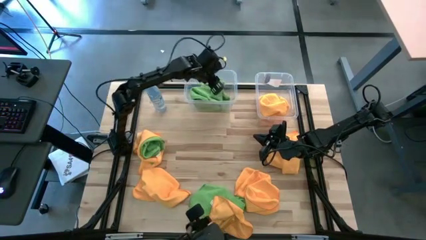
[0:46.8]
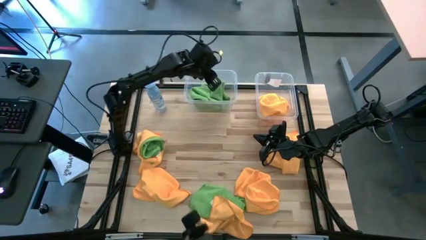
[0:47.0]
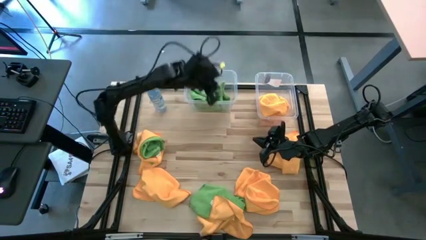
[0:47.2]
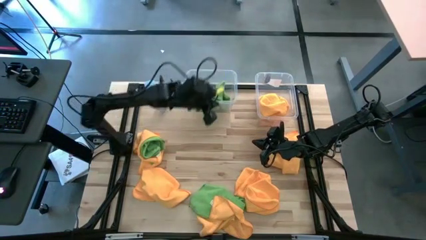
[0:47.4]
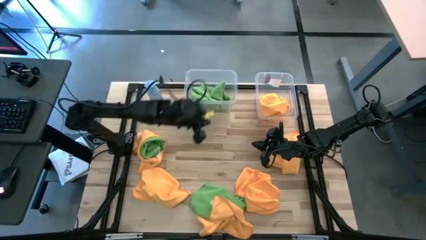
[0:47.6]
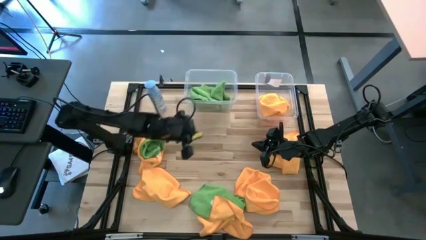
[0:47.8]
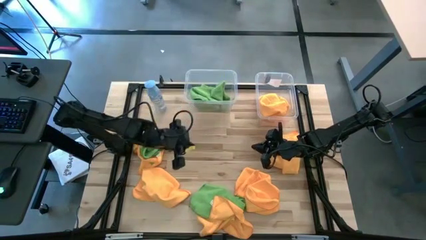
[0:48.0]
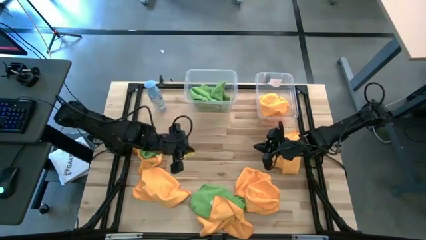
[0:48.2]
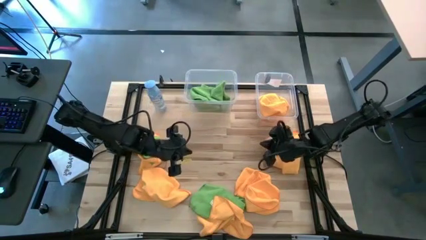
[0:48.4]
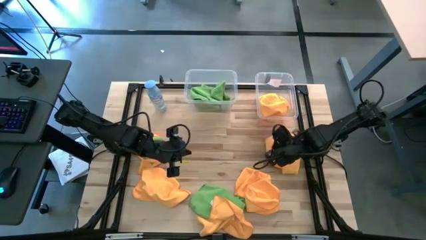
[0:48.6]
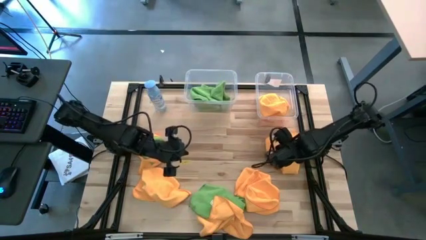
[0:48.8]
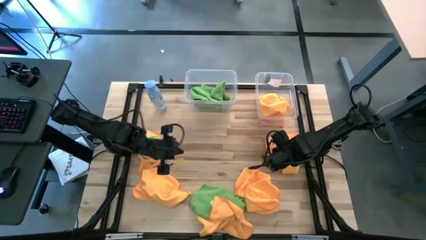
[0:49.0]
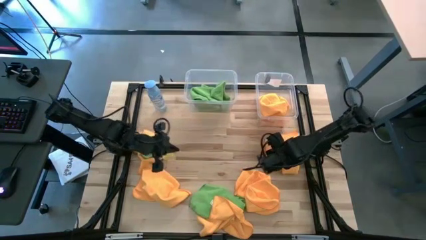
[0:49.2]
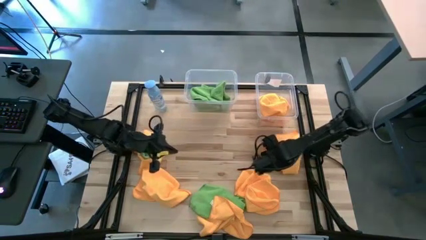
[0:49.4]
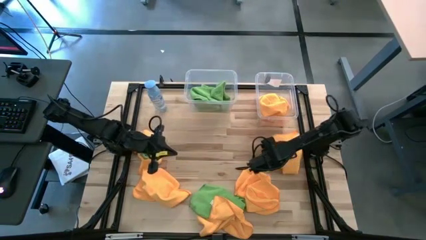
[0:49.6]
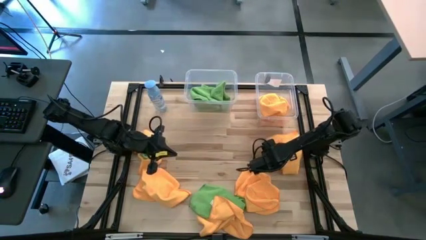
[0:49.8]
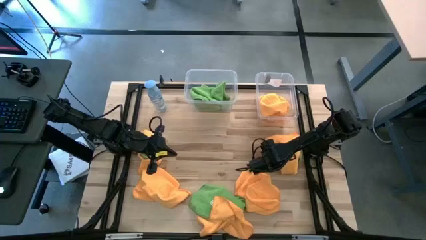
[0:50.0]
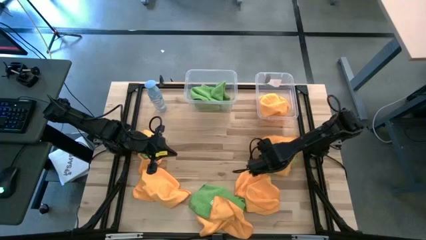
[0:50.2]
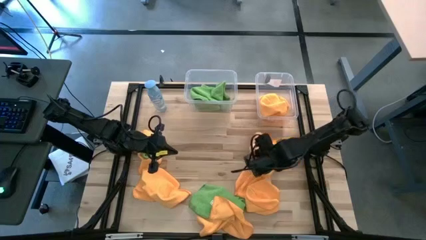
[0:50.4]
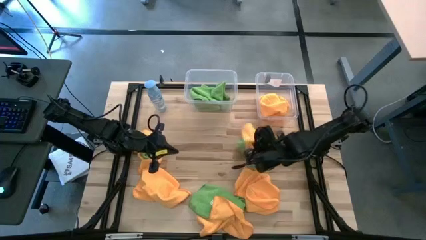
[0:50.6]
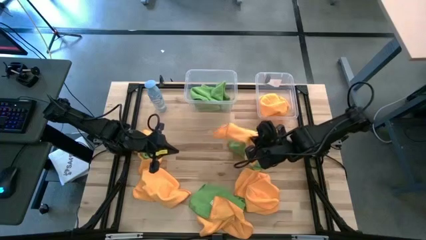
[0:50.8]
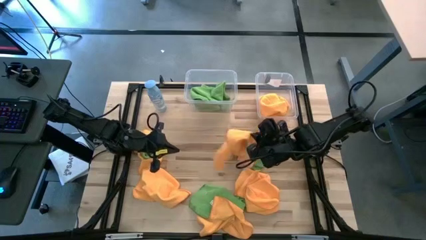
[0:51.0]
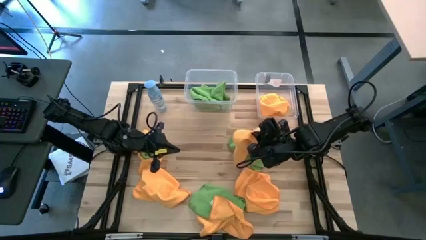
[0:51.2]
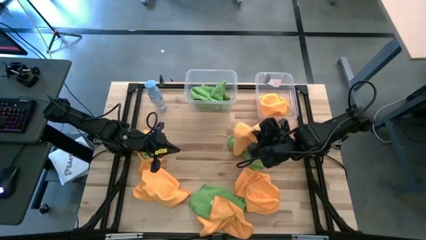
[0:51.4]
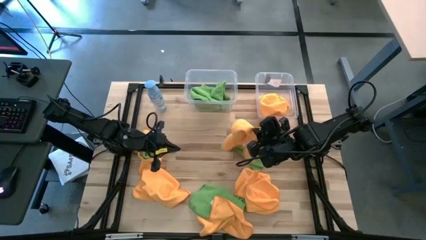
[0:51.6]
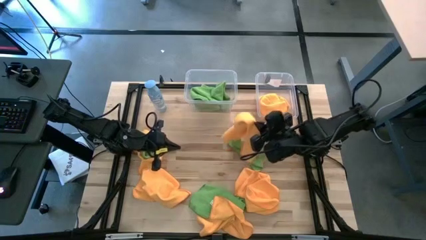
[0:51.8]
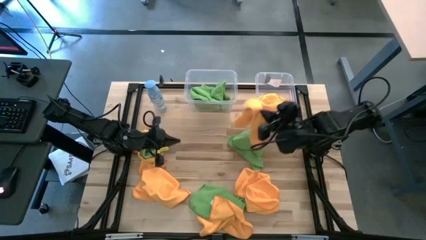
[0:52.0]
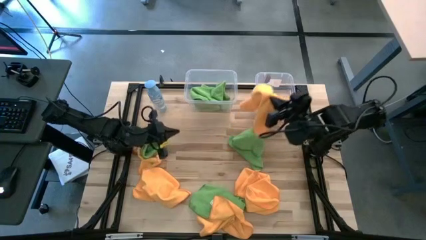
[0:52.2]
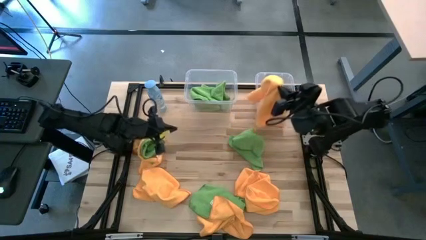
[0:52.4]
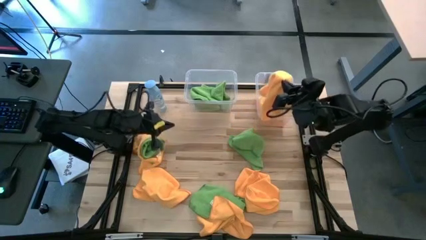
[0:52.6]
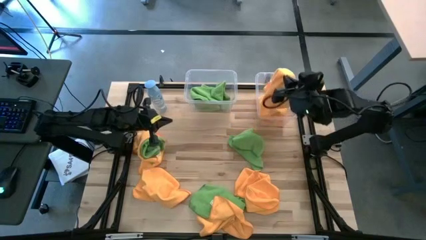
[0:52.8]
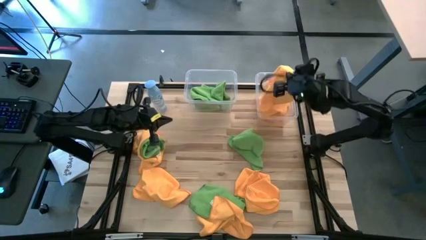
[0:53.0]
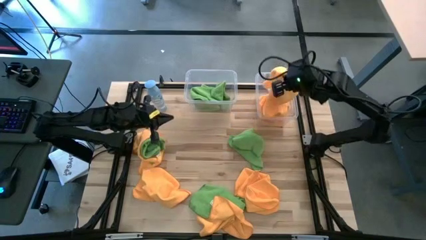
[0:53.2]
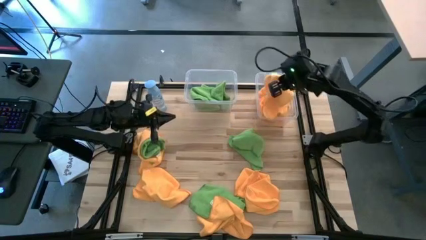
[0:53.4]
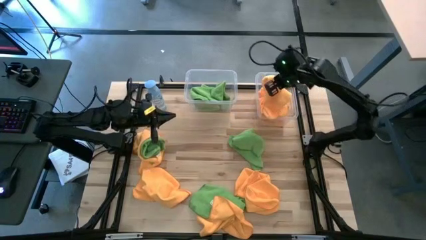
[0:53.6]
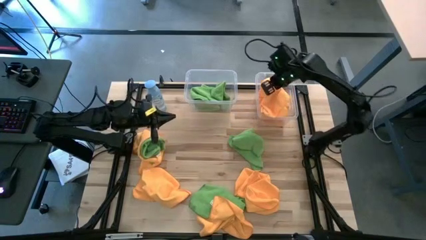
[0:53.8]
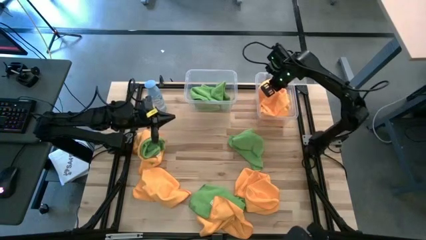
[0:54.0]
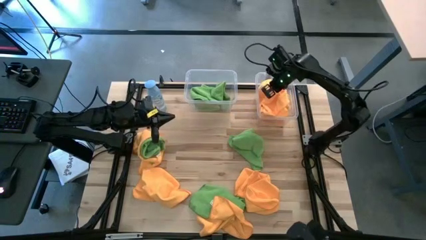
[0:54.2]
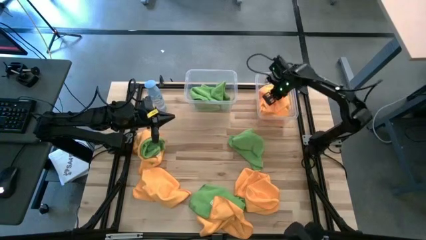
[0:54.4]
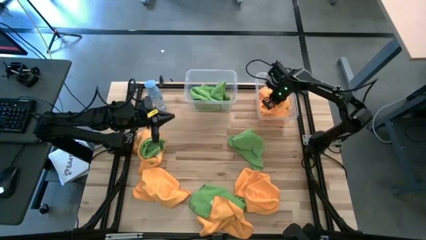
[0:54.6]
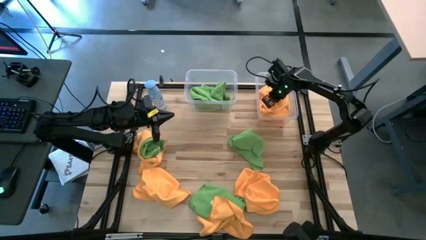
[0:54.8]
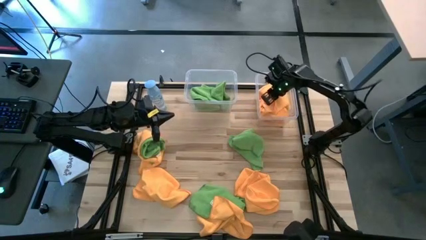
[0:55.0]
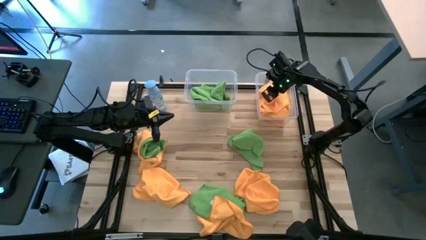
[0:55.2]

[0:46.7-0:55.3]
Task: Sort microfiber towel by color & place in baskets
Put the yellow towel into the right transparent bin

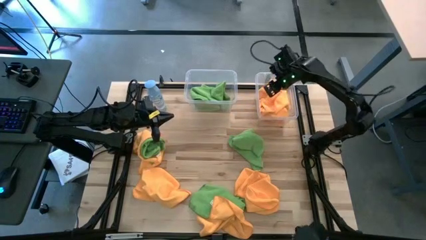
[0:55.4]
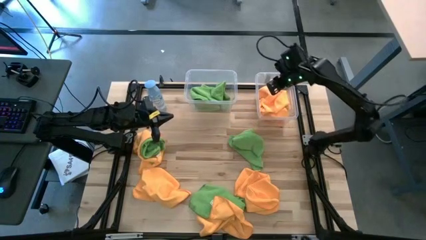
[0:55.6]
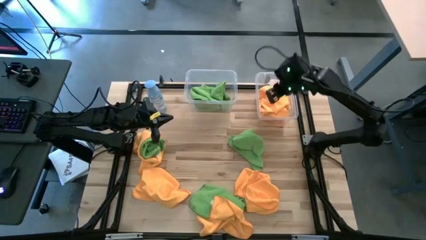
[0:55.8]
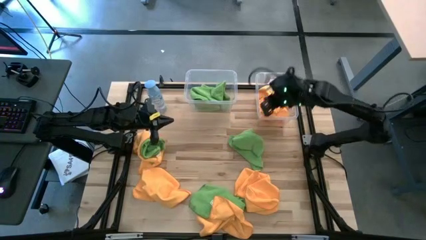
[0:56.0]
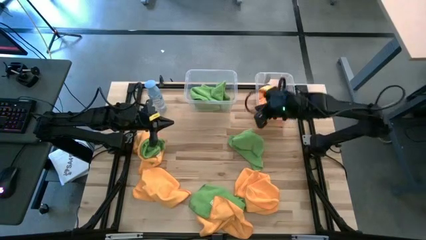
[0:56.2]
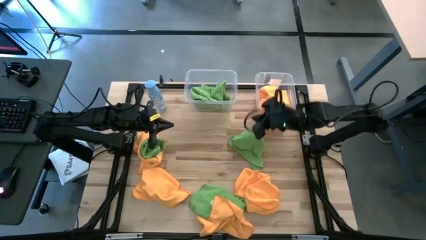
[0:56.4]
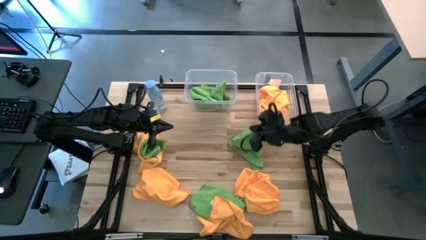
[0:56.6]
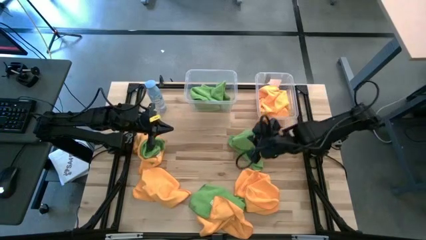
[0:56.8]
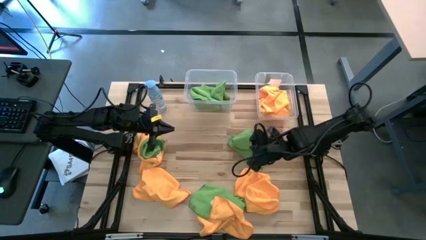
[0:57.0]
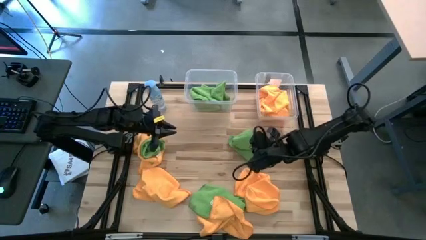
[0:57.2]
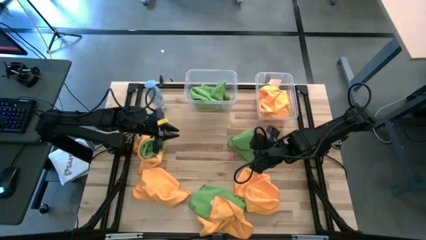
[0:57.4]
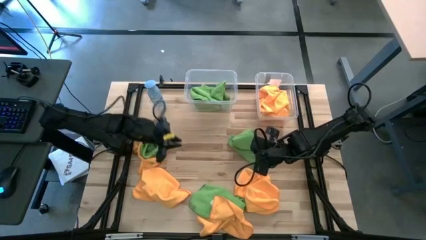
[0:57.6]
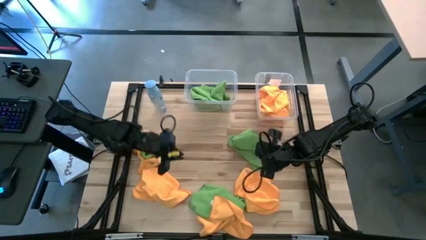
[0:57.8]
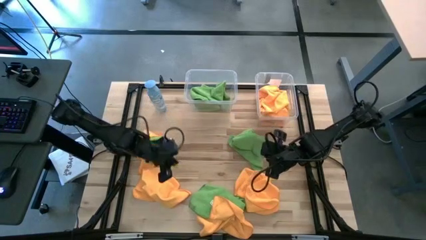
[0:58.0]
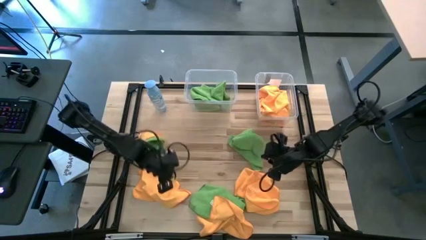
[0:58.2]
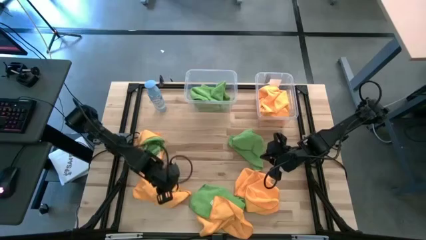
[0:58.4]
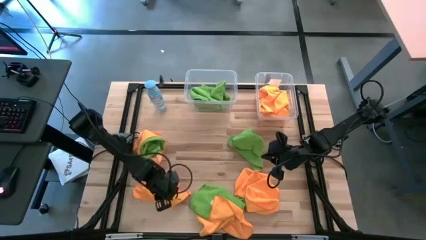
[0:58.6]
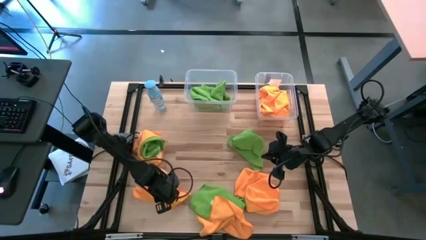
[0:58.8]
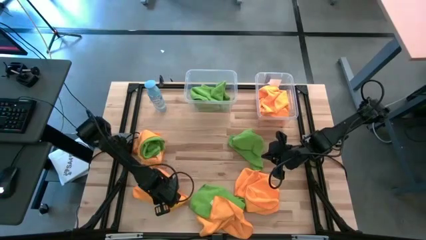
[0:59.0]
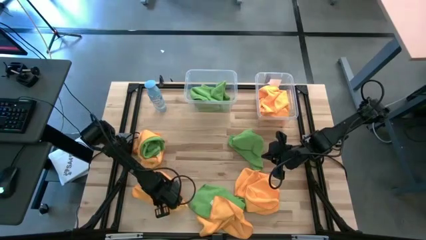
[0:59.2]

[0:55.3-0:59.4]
Put the yellow towel into the right transparent bin
